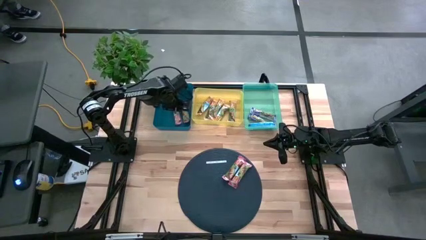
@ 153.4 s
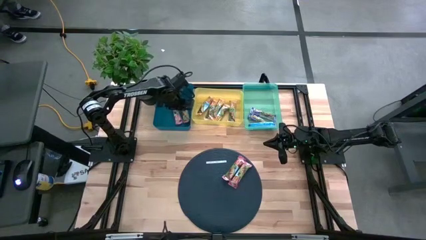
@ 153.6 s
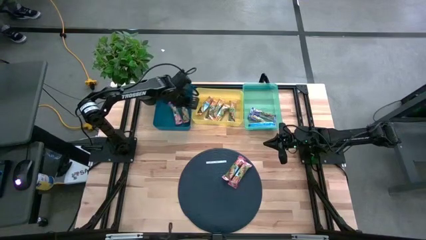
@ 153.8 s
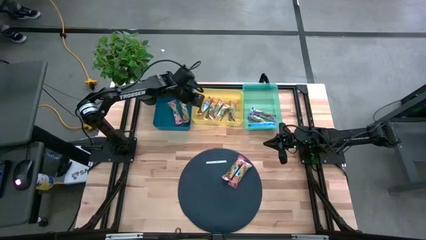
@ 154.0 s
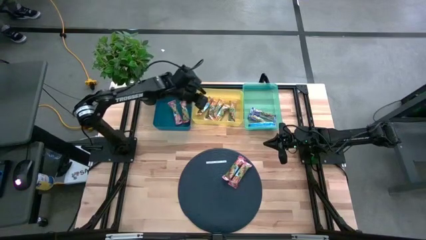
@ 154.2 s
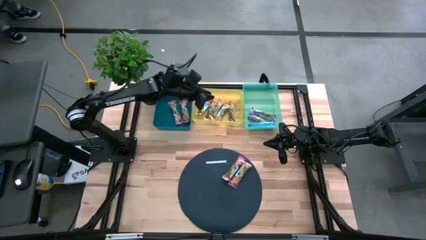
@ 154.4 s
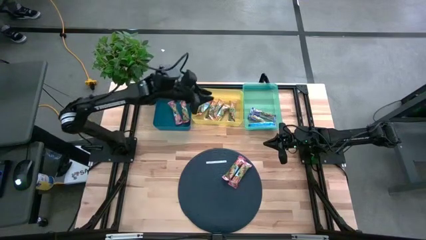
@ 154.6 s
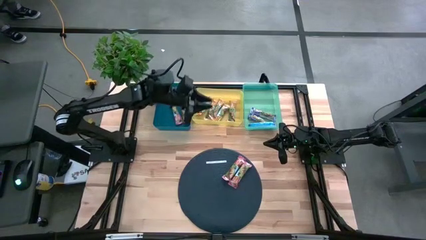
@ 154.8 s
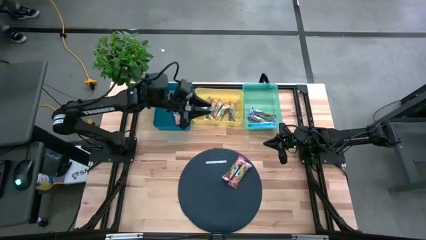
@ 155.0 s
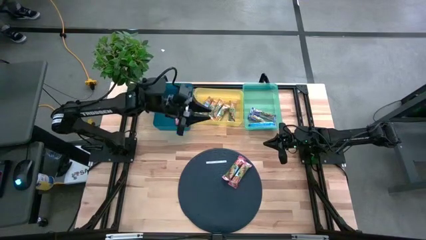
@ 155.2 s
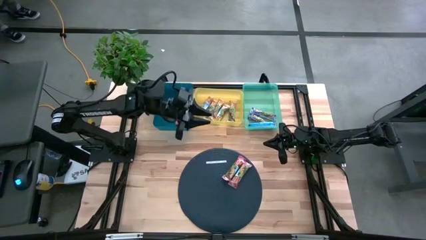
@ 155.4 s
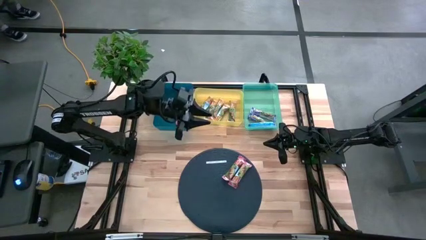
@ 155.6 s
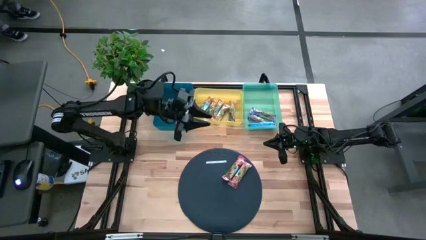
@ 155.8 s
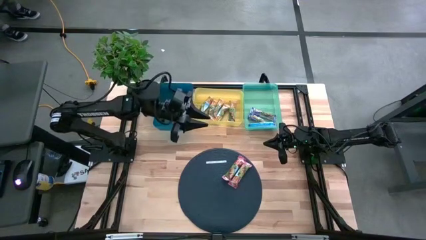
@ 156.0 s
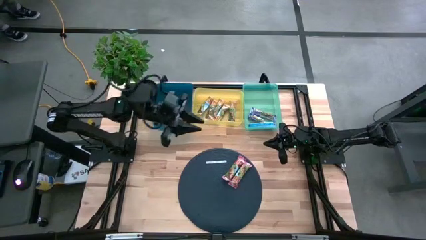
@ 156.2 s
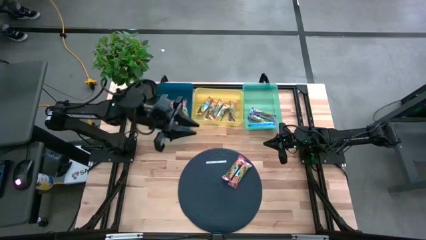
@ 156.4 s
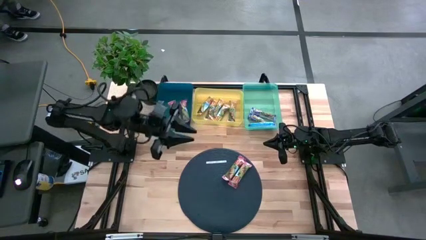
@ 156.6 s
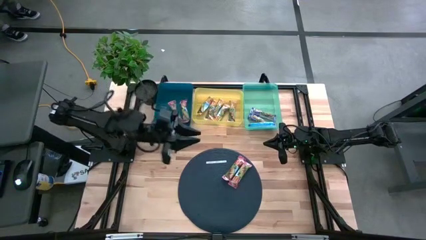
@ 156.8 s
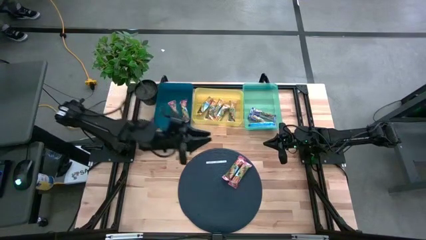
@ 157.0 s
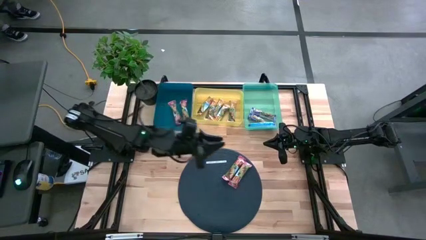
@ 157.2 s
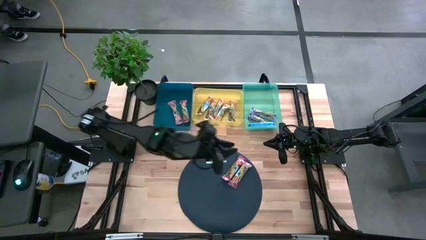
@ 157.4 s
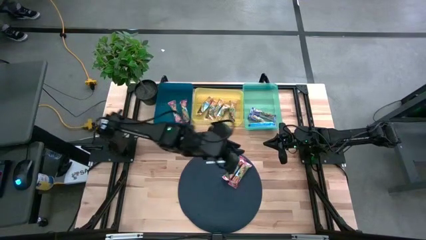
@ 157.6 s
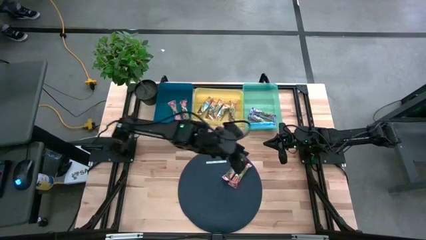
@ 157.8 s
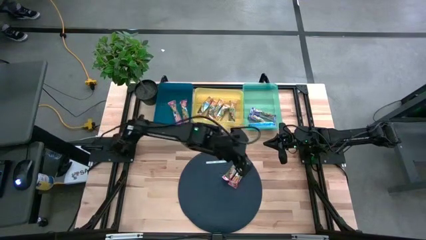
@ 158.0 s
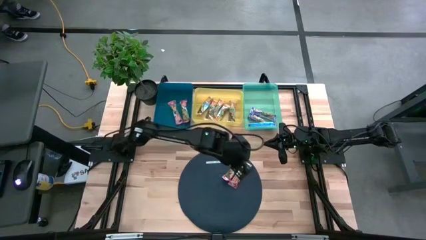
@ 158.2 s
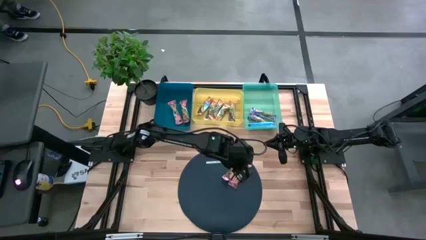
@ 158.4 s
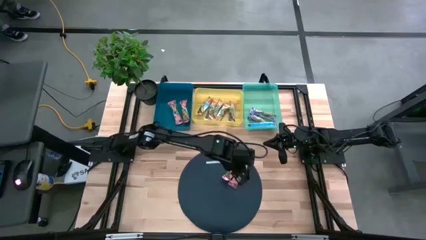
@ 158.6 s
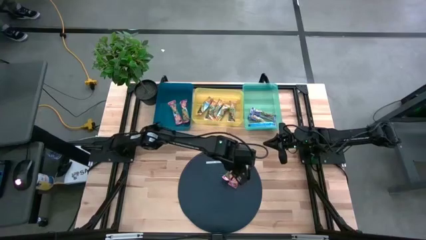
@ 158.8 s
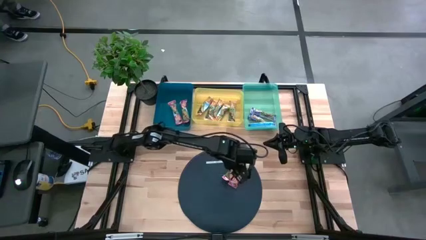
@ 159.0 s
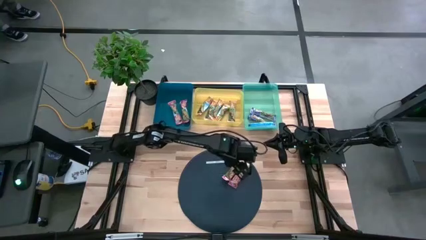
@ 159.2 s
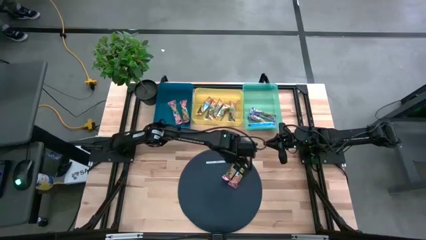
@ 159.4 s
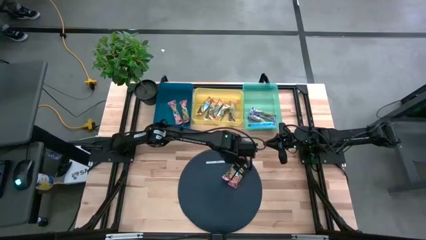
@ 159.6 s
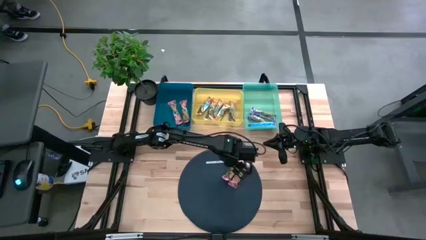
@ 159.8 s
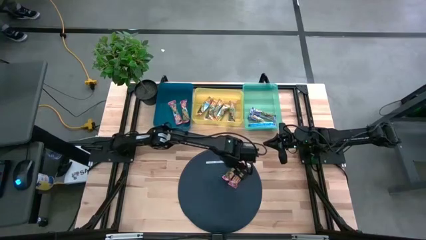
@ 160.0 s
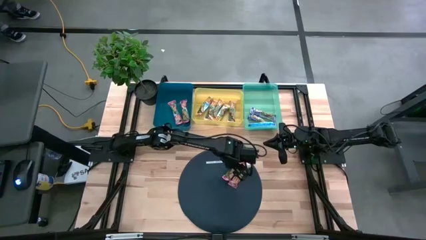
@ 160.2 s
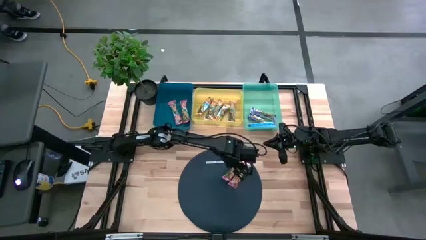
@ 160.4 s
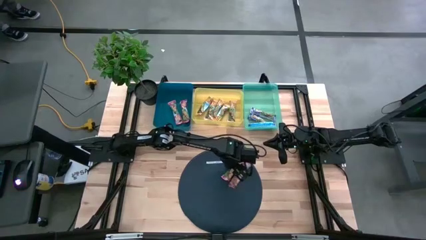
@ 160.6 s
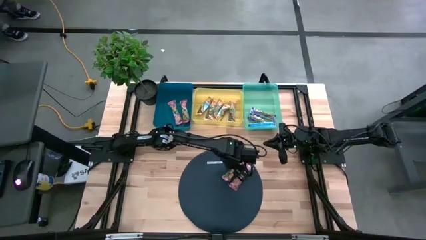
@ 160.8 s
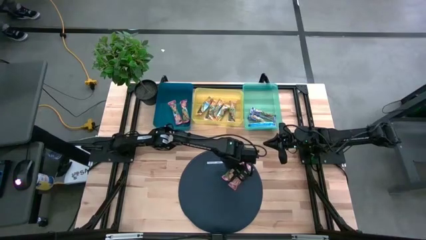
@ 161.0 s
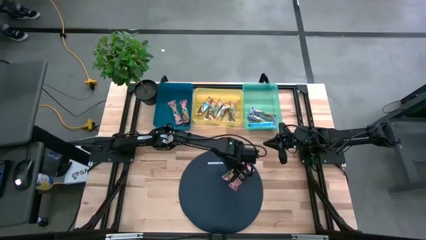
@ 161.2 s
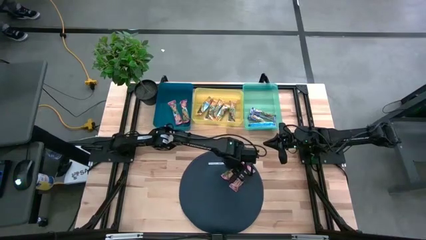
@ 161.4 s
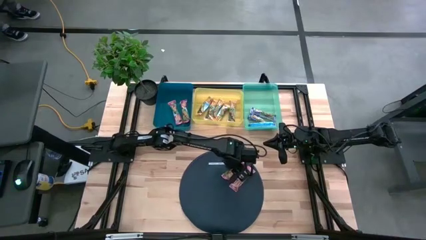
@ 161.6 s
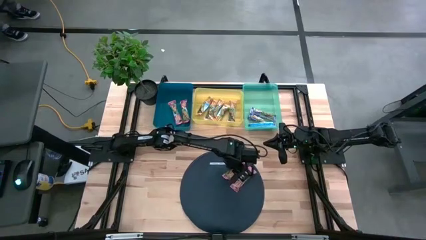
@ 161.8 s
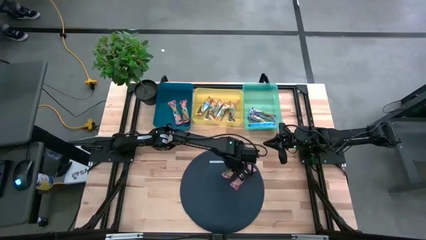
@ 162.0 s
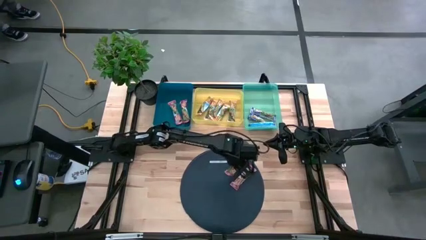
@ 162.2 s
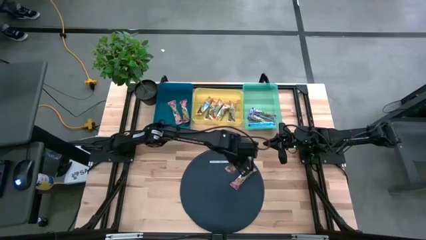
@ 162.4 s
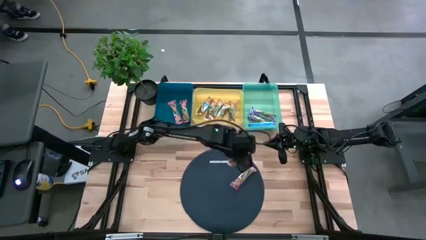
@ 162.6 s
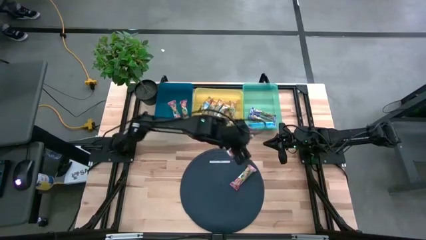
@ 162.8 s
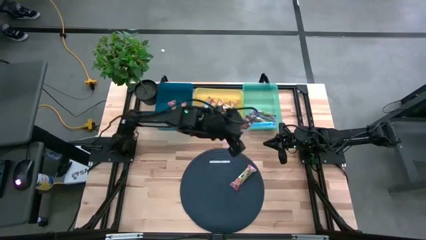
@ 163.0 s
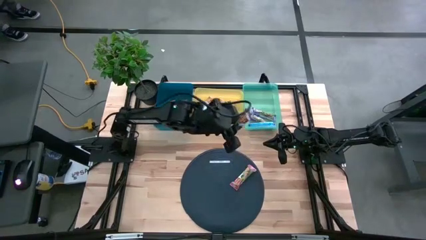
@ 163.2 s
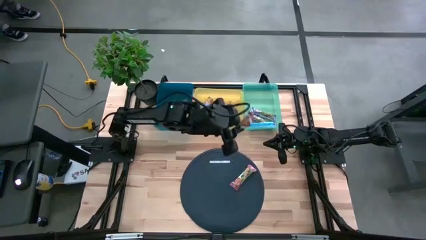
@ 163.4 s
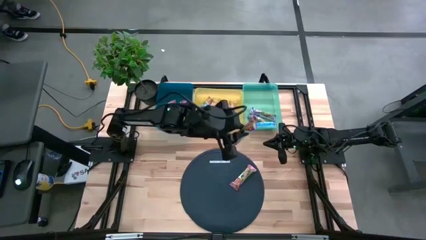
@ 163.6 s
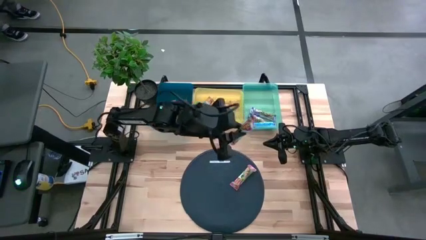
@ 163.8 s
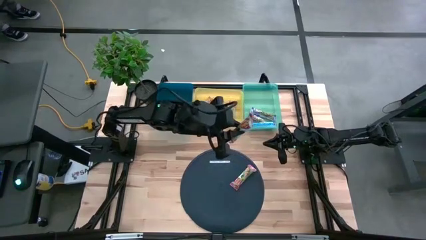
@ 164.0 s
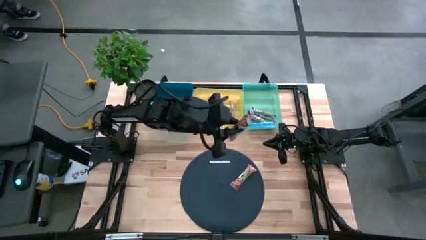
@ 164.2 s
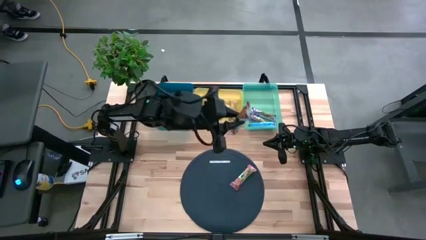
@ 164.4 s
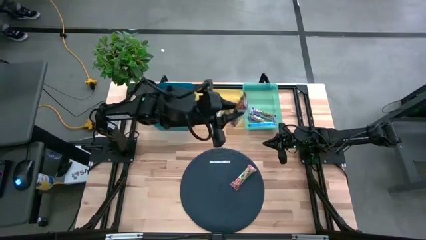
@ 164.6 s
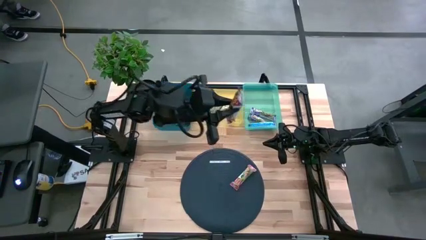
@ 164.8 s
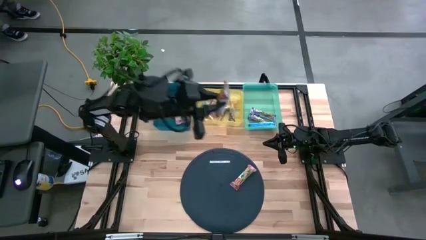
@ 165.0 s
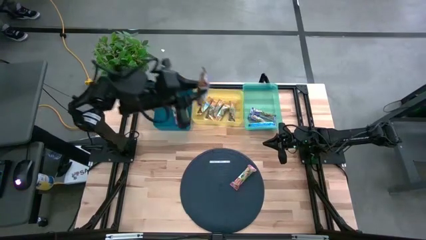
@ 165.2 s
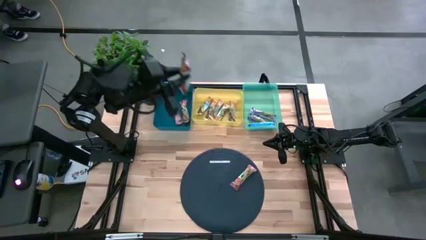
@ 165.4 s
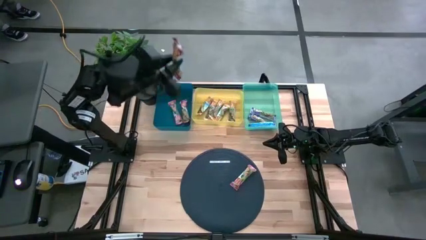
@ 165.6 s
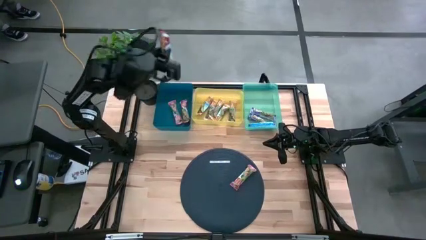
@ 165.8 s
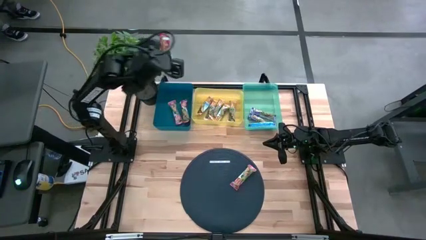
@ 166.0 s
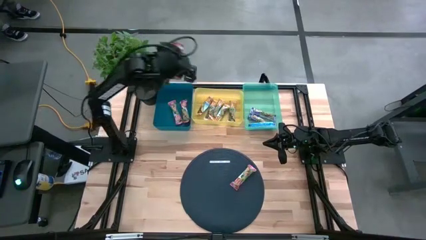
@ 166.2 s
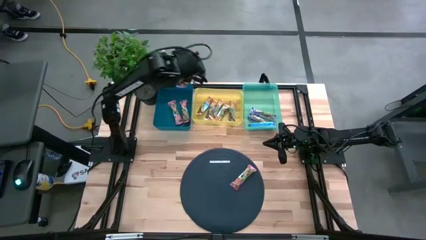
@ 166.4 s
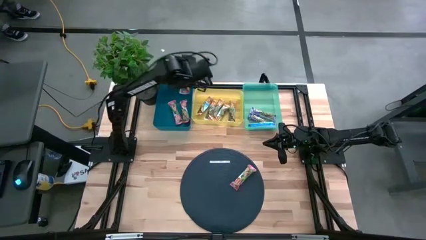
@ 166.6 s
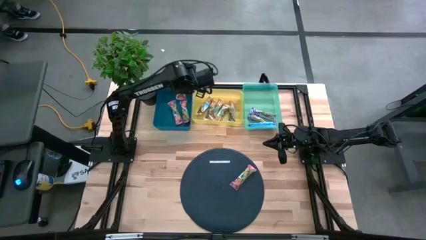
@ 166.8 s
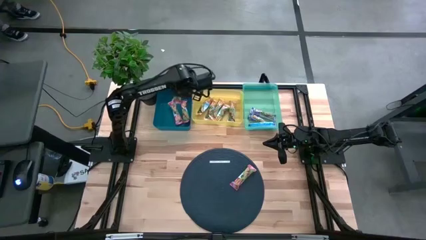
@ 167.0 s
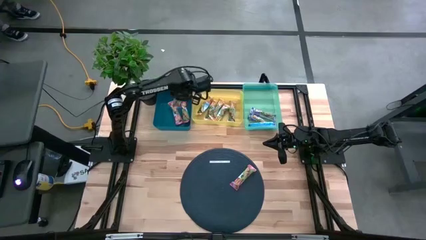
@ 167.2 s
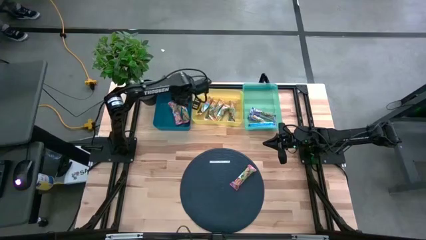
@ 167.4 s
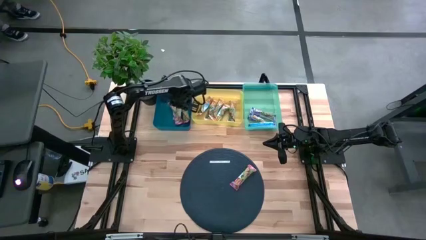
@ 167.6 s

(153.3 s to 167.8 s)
Task: Pick and place Granola Bars by type
Put the red granola bar into the blue bin

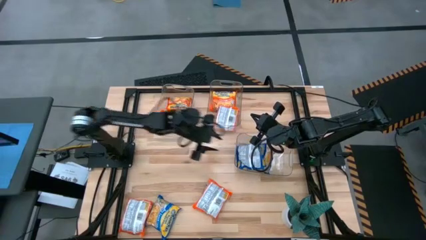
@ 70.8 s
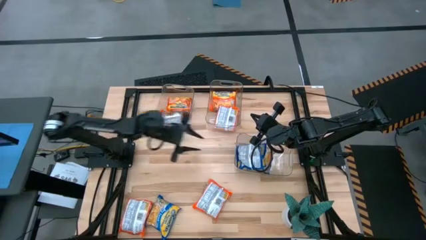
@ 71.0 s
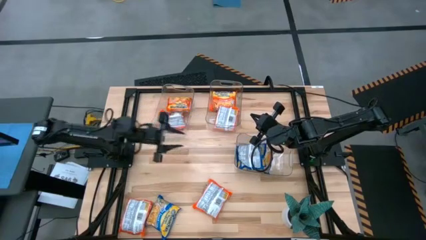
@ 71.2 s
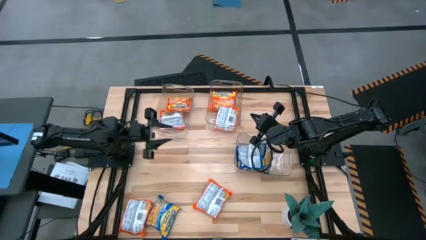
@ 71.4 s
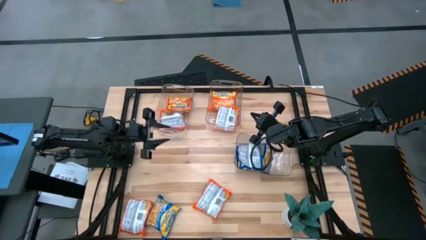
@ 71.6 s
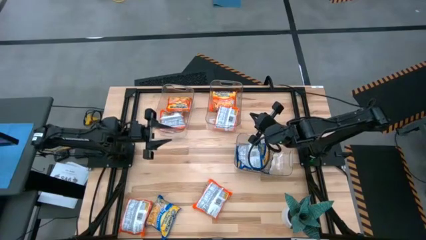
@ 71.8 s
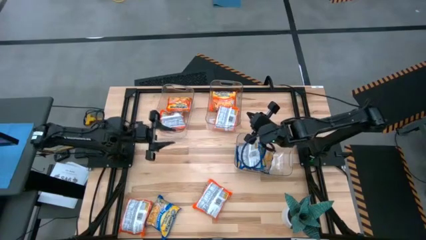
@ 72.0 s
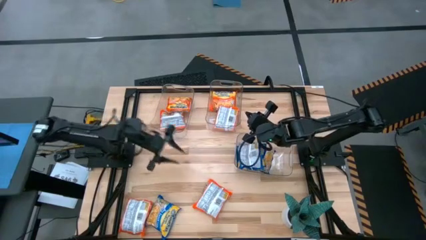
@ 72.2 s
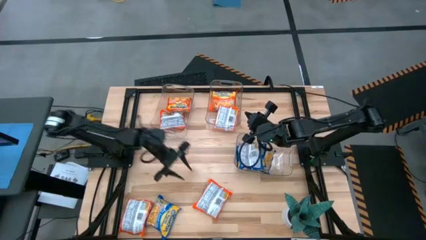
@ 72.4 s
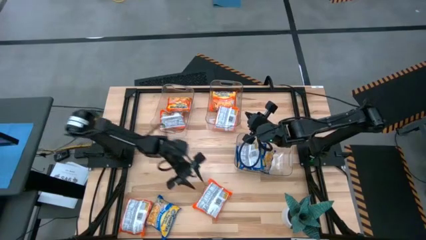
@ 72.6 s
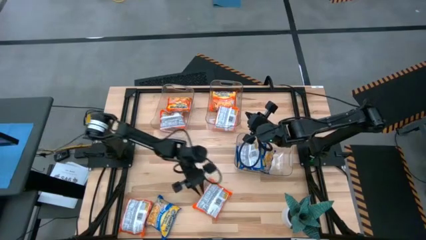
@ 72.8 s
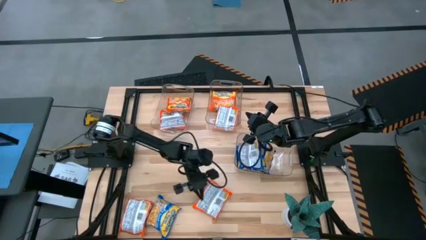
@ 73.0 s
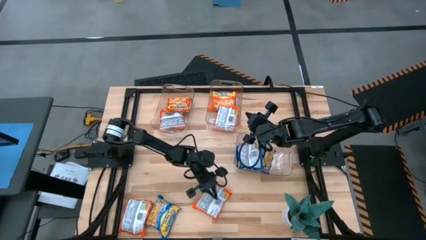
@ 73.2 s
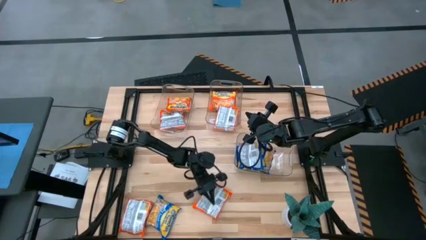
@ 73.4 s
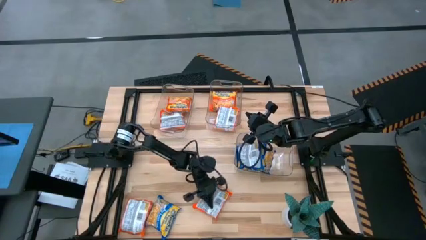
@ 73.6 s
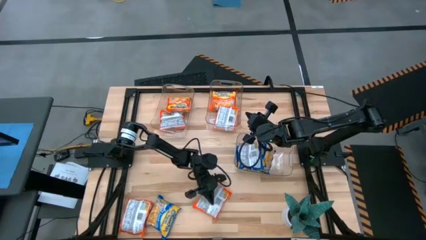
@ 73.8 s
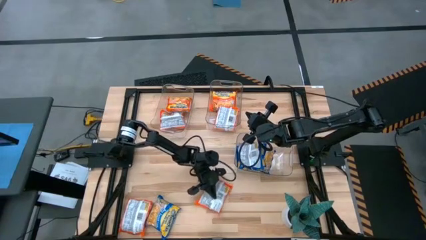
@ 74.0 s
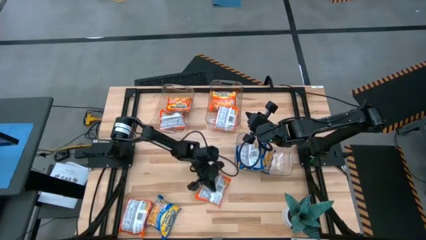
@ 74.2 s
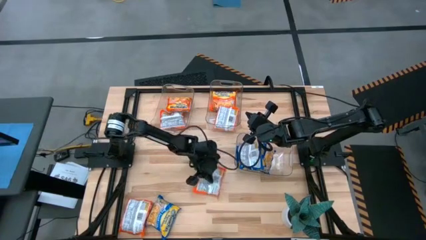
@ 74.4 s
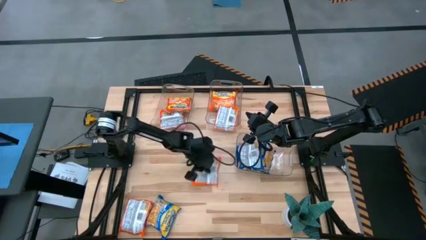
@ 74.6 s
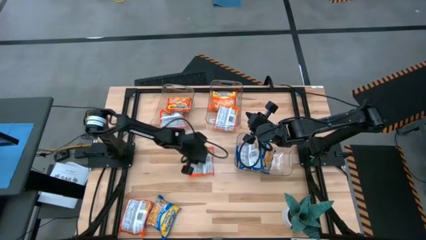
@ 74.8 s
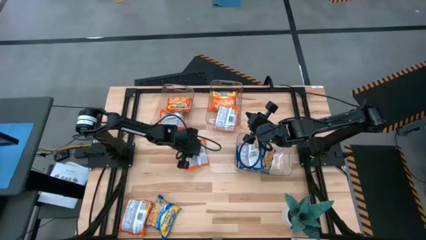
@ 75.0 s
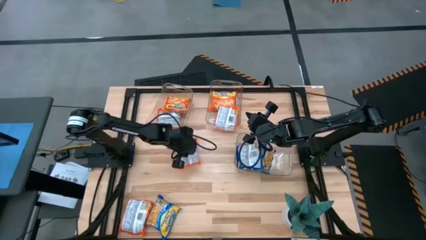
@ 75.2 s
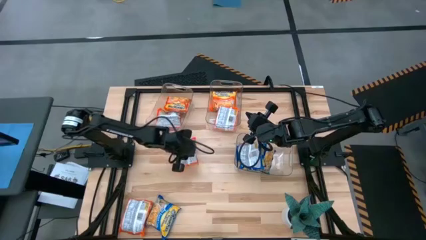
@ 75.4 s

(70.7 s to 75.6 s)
Task: Sort Maruchan noodles
Move the orange bag to the center of the table
